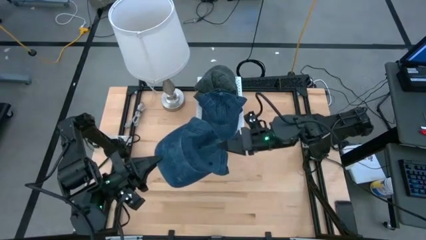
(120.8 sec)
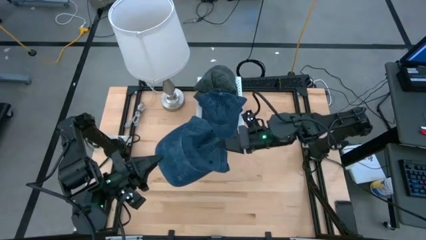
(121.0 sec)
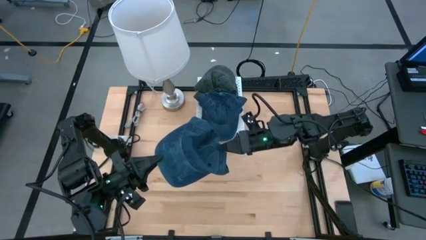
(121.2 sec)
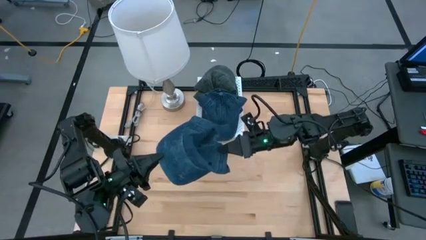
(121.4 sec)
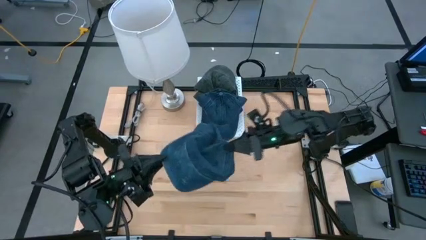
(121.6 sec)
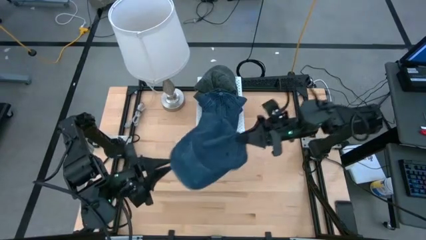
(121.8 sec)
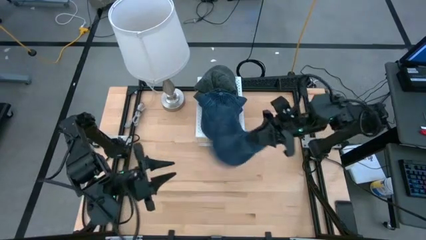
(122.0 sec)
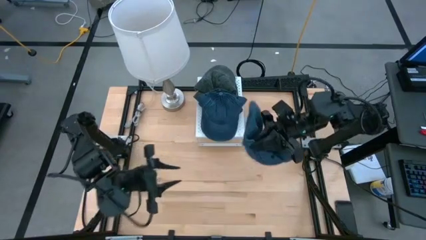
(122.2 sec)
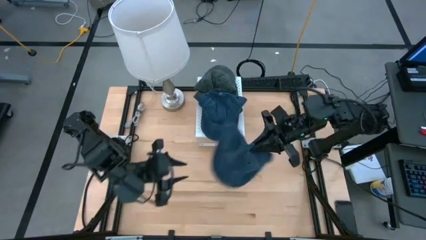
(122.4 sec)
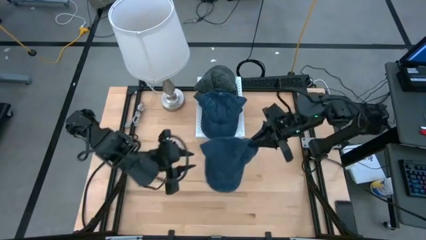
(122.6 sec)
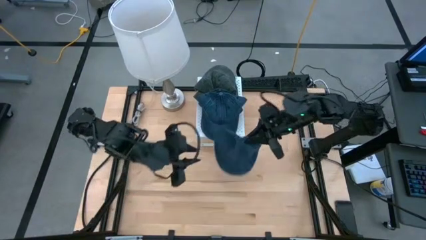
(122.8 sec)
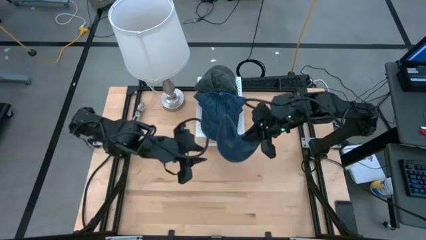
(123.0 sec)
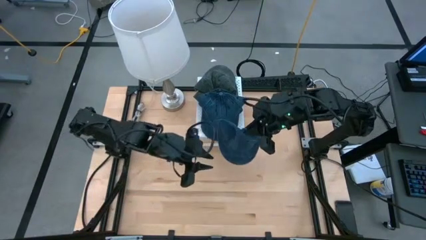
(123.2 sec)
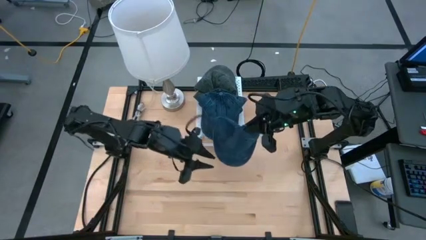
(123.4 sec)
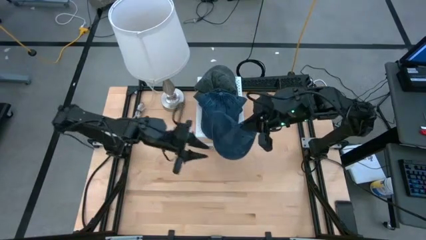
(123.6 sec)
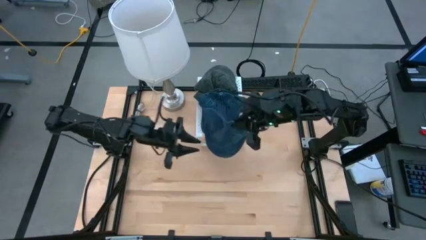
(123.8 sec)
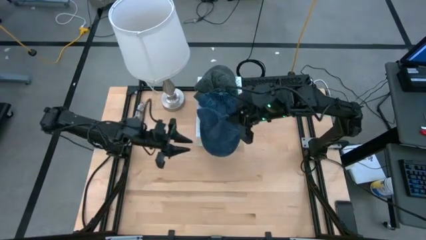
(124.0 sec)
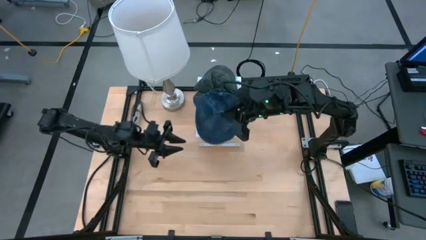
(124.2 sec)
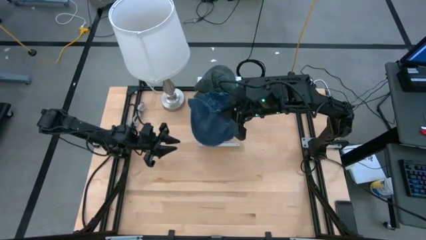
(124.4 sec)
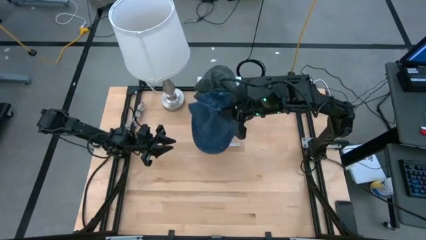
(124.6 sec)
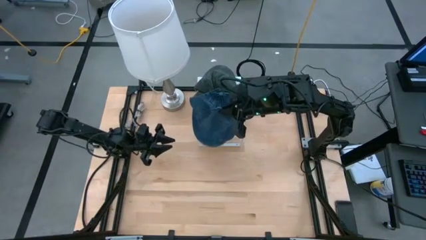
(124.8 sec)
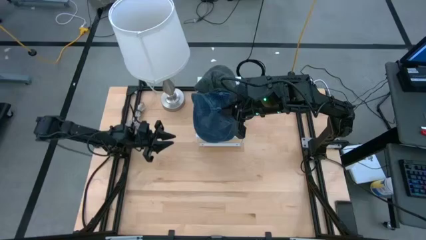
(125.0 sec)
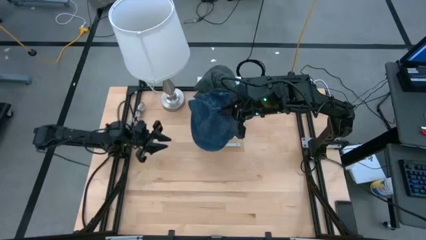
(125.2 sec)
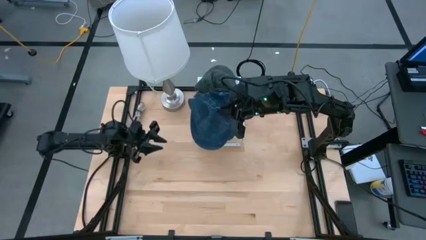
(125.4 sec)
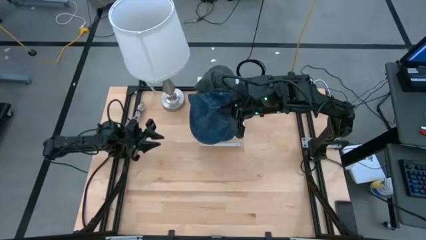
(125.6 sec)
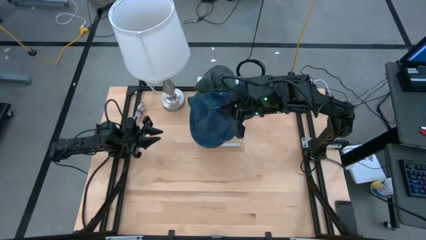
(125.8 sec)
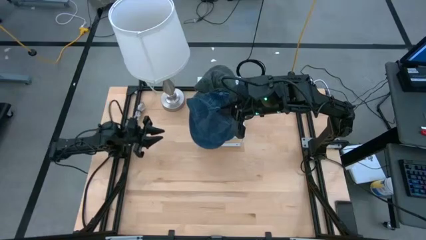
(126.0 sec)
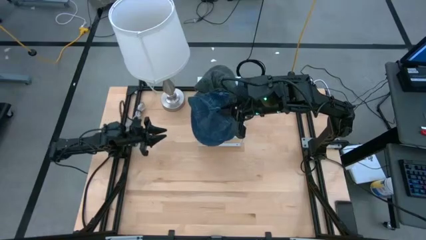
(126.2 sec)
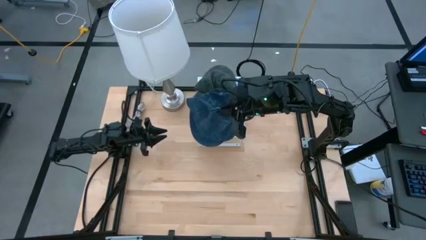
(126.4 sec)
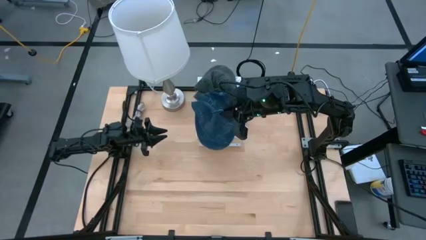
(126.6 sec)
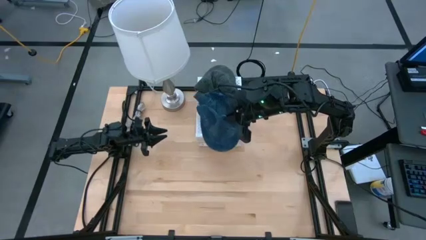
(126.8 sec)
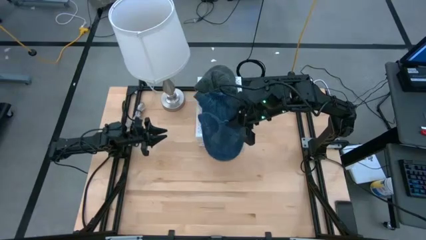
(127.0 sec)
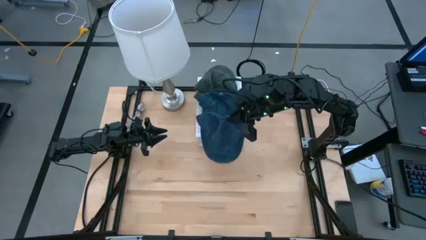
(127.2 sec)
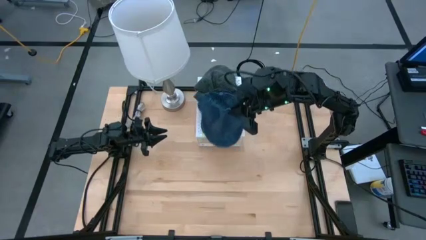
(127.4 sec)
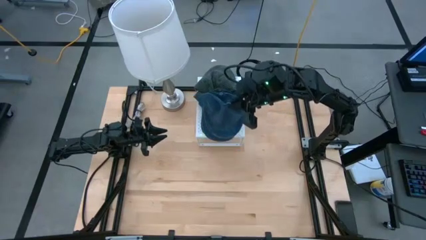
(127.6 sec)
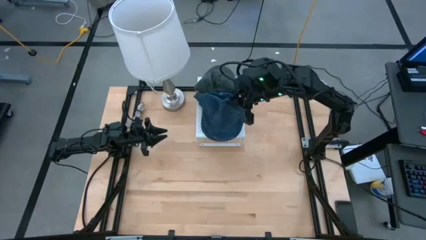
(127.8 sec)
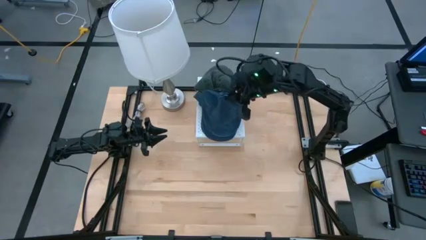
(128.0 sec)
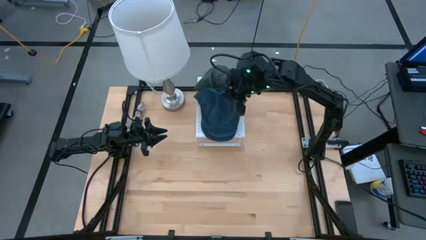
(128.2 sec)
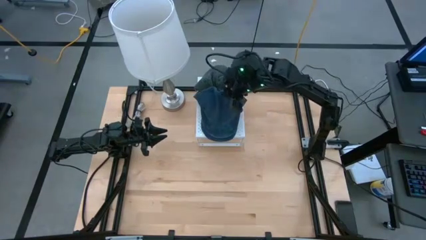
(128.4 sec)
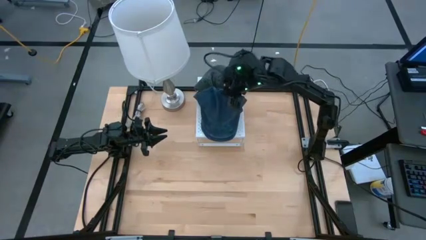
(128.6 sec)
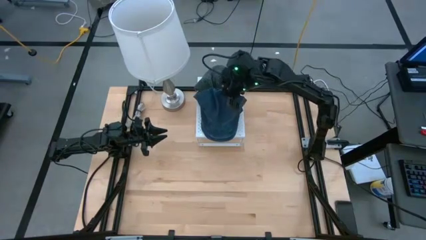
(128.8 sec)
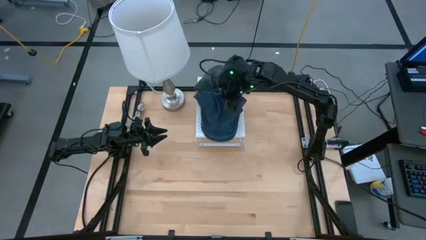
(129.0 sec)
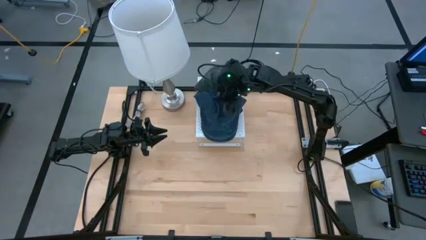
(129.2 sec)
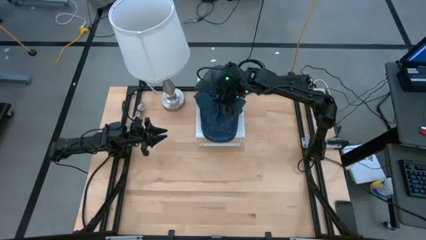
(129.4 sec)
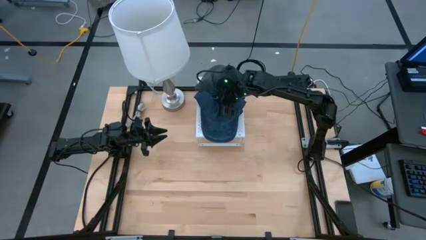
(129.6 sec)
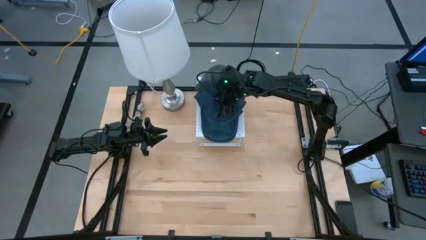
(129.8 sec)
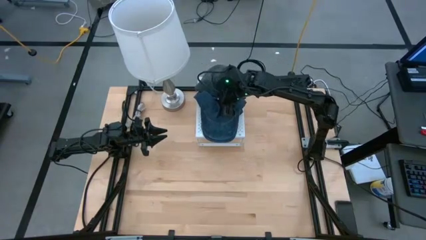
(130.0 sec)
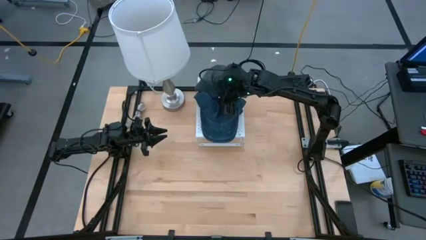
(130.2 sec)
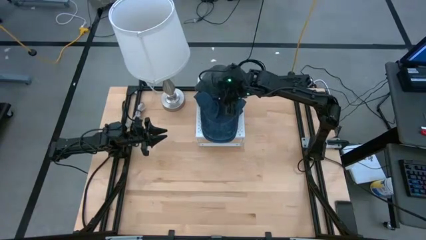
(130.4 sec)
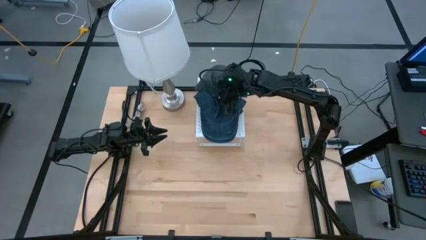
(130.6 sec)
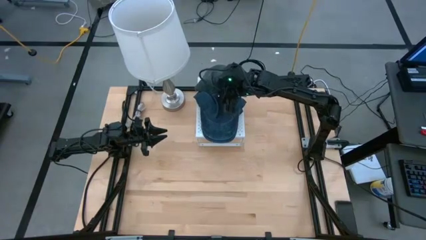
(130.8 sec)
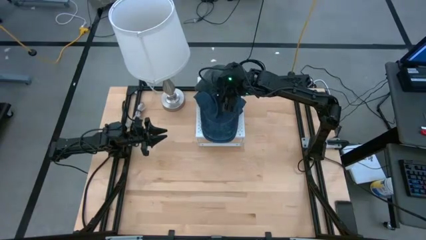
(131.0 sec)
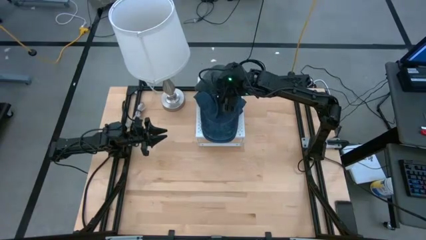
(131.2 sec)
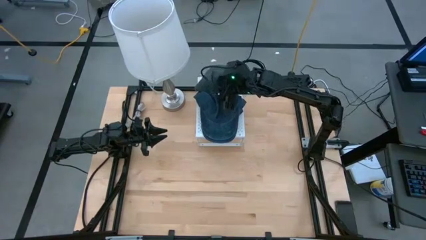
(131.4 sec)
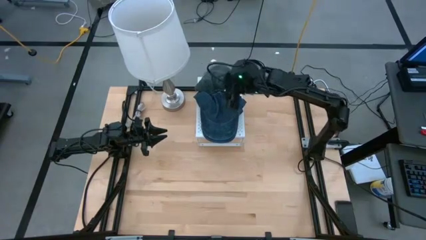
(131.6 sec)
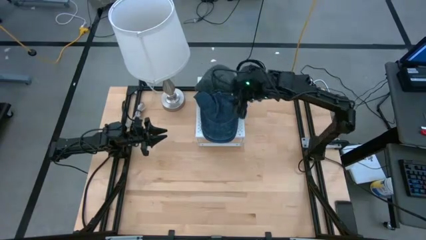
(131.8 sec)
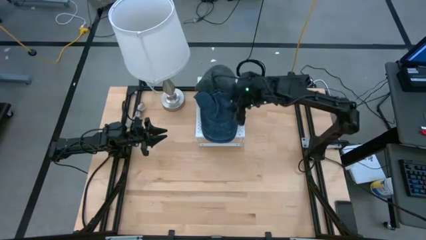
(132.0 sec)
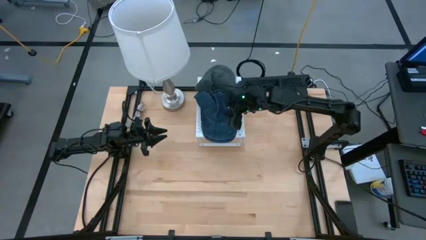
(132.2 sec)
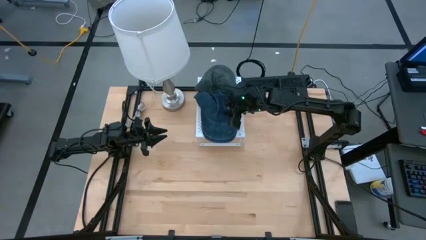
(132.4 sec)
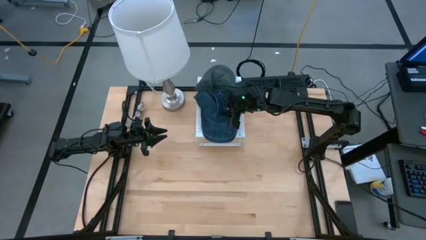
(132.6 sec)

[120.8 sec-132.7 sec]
Task: Pick & Place hat
Stack the blue cap on top of the other blue caps on the shelf

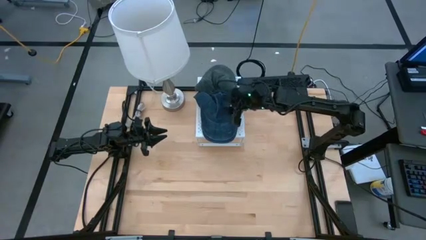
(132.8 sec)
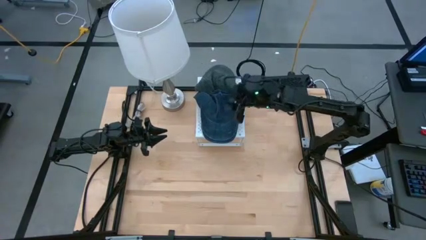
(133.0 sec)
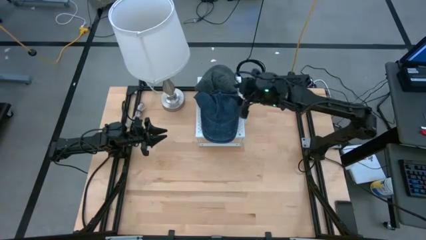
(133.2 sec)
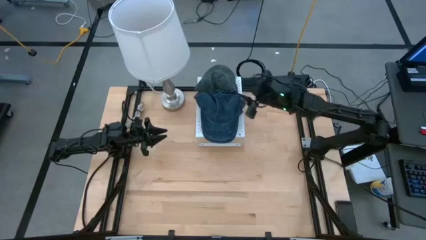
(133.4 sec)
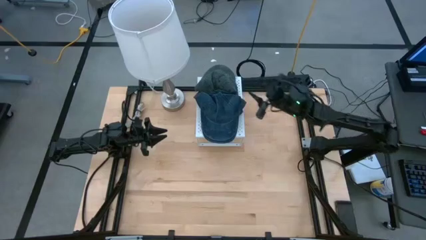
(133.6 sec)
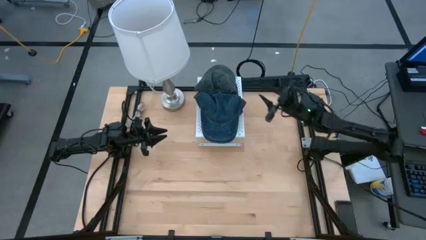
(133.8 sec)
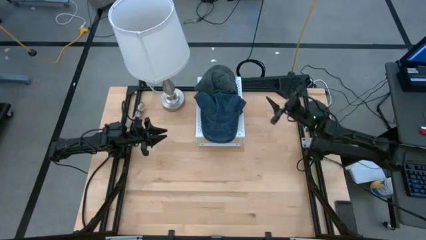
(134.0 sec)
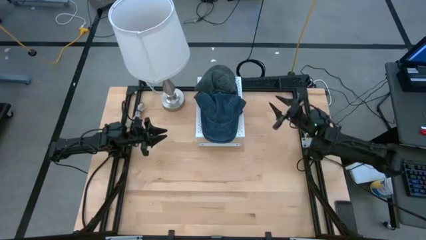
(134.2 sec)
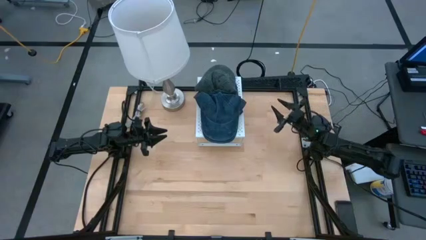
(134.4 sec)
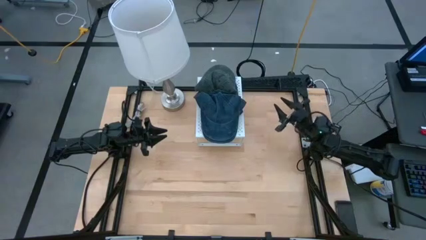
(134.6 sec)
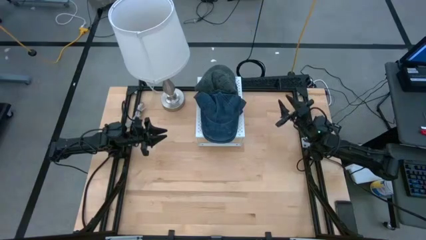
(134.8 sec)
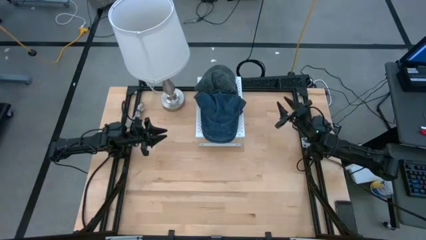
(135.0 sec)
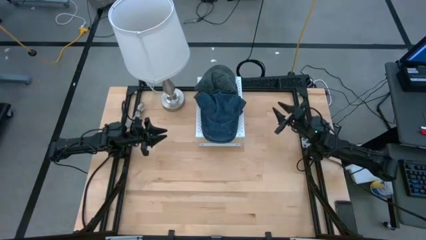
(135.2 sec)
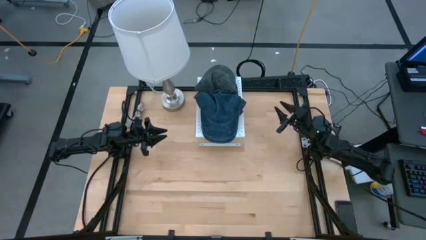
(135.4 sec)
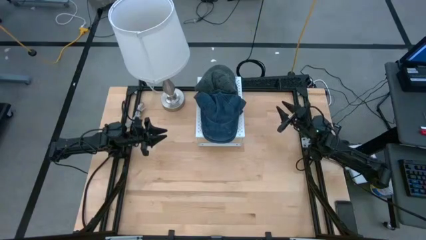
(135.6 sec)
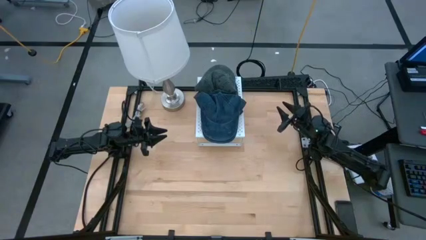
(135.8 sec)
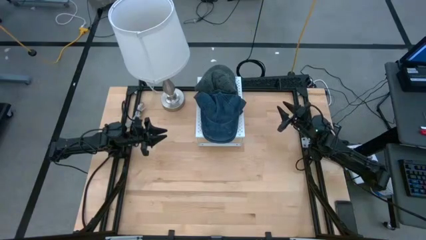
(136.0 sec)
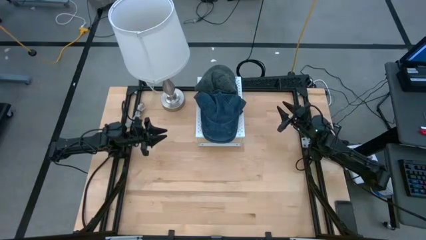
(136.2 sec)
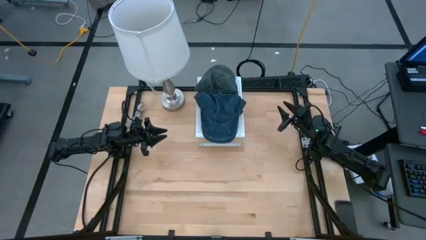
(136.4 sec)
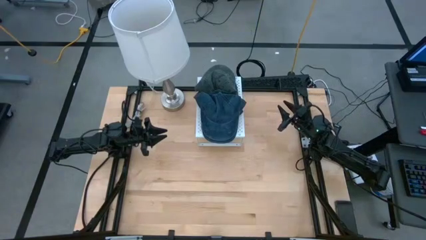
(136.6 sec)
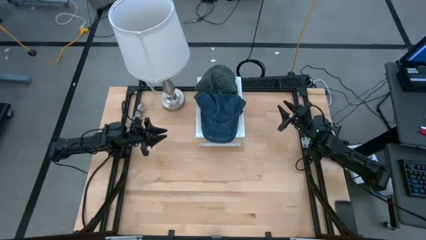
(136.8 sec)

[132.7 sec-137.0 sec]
Return to Home Position
